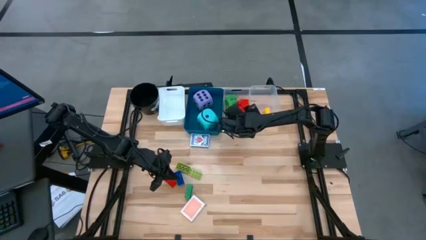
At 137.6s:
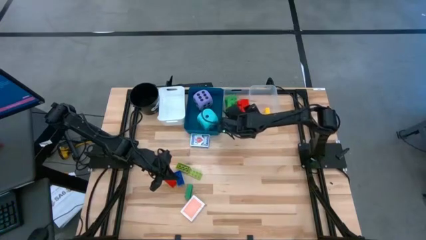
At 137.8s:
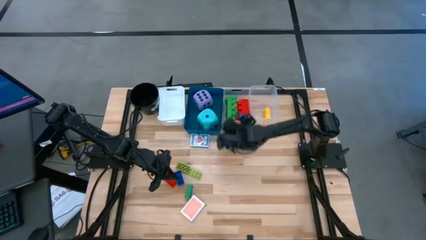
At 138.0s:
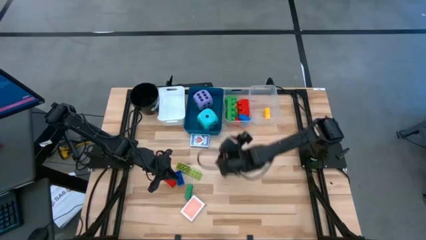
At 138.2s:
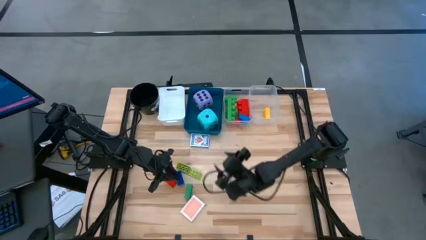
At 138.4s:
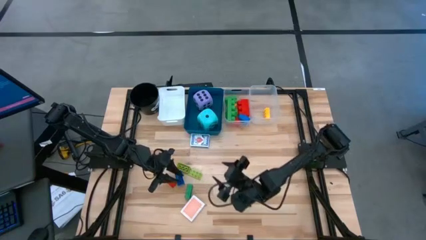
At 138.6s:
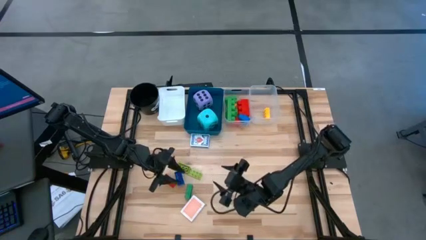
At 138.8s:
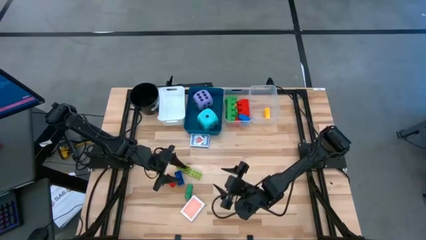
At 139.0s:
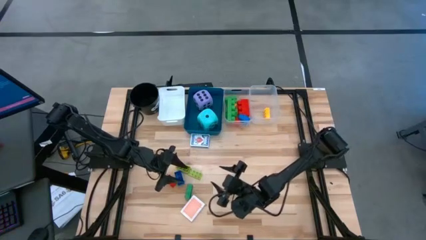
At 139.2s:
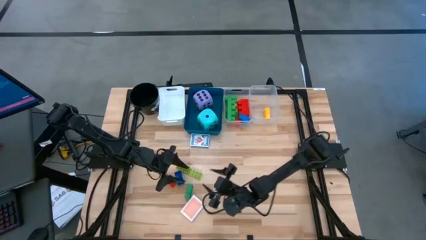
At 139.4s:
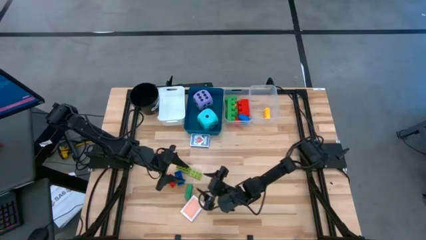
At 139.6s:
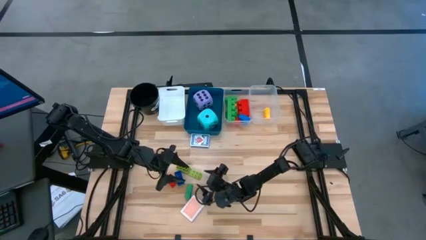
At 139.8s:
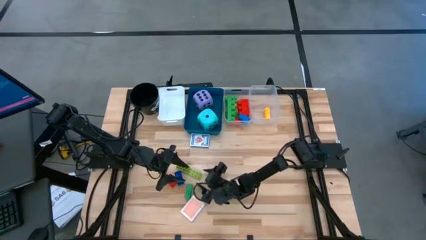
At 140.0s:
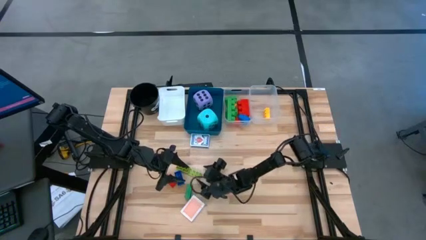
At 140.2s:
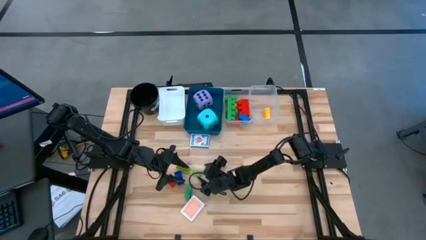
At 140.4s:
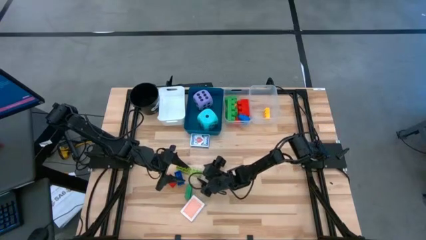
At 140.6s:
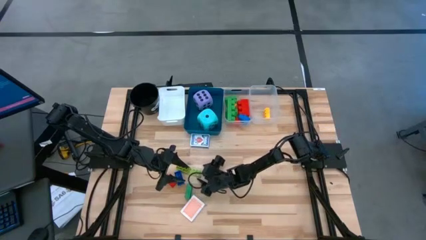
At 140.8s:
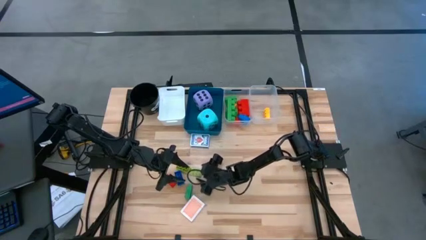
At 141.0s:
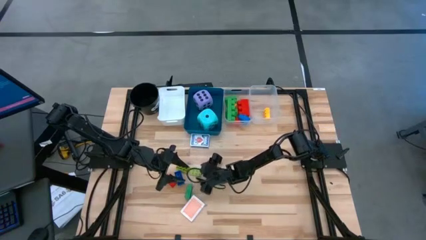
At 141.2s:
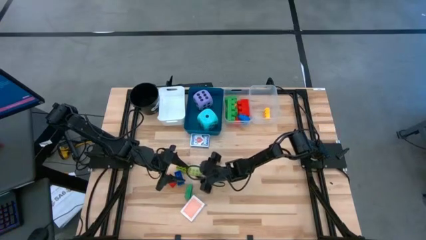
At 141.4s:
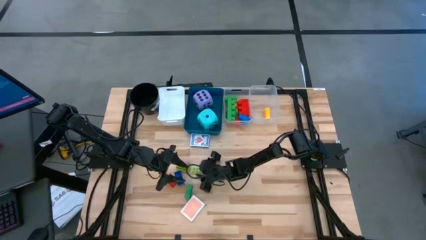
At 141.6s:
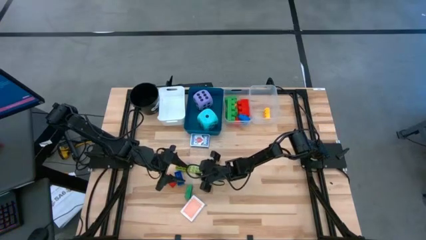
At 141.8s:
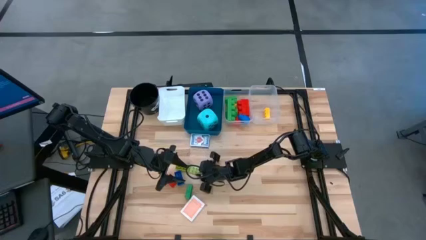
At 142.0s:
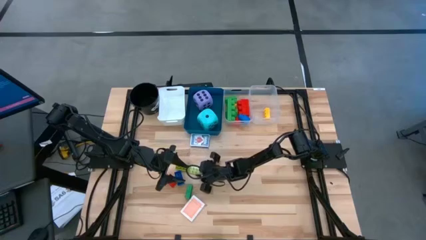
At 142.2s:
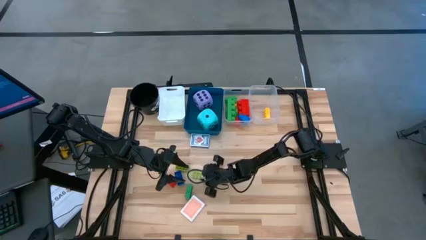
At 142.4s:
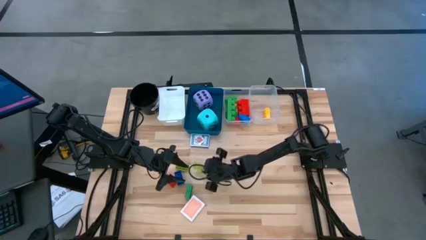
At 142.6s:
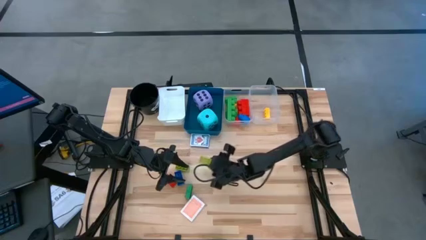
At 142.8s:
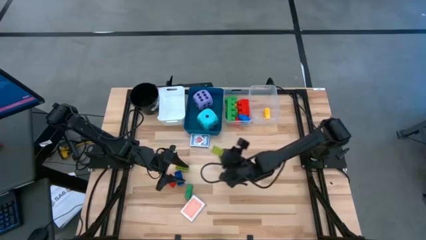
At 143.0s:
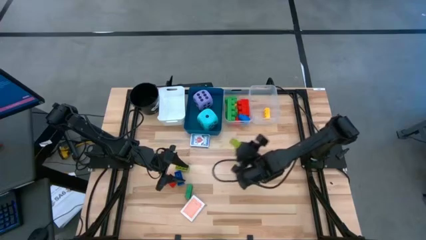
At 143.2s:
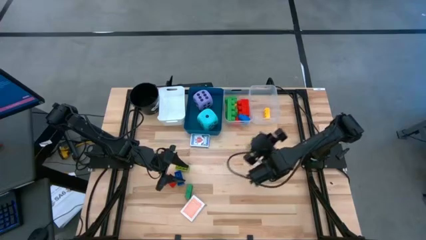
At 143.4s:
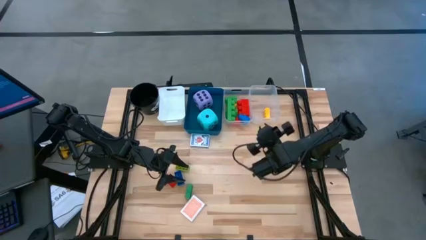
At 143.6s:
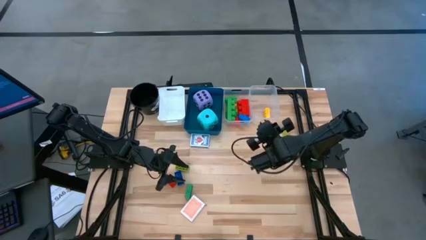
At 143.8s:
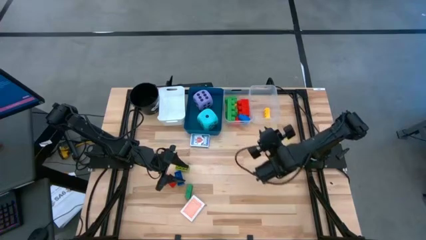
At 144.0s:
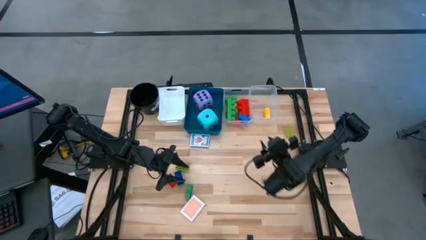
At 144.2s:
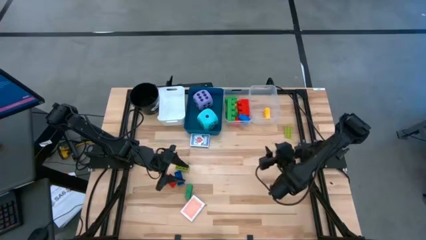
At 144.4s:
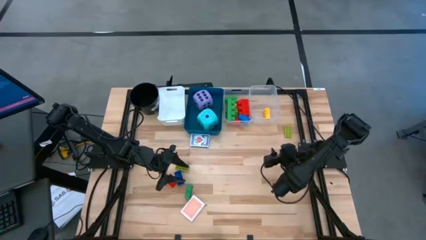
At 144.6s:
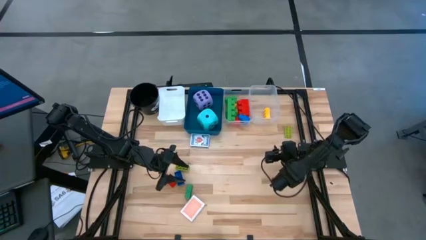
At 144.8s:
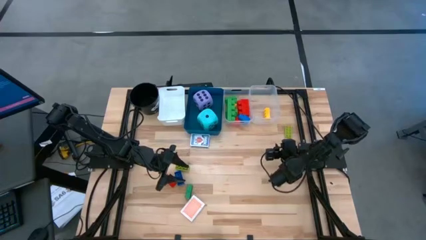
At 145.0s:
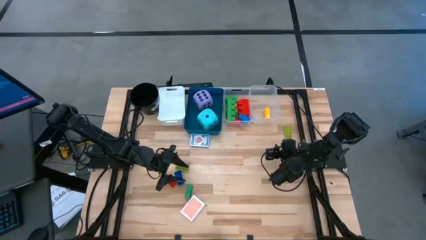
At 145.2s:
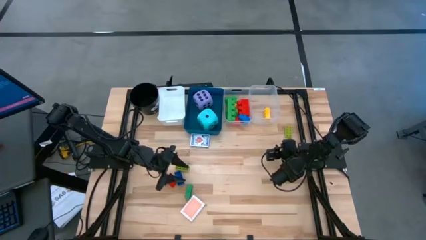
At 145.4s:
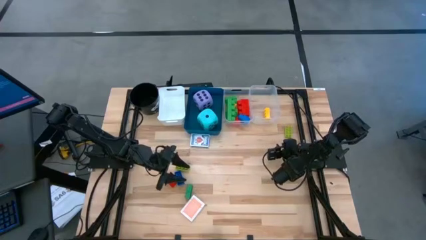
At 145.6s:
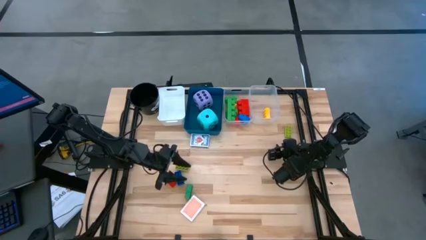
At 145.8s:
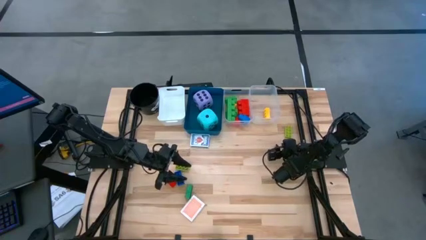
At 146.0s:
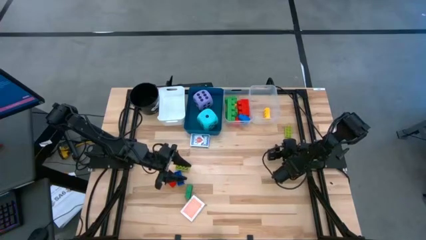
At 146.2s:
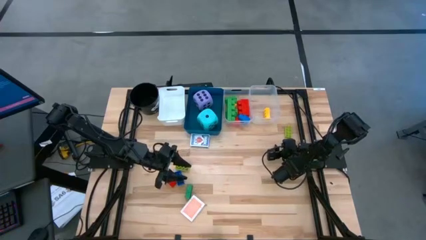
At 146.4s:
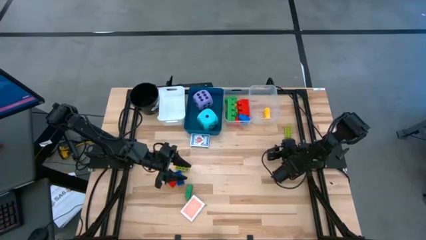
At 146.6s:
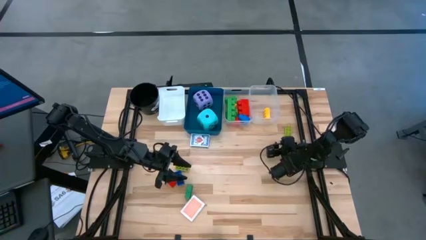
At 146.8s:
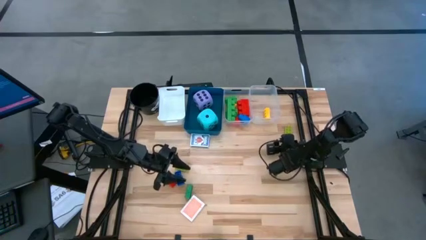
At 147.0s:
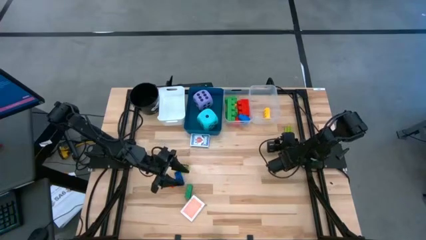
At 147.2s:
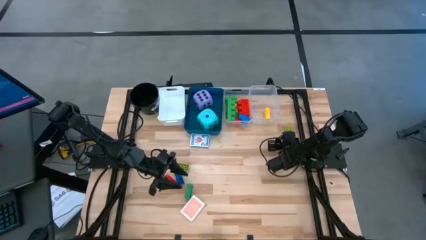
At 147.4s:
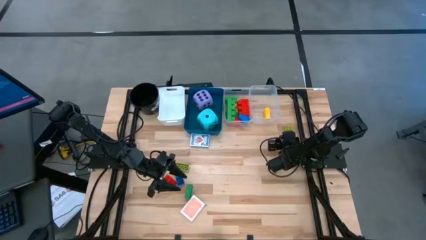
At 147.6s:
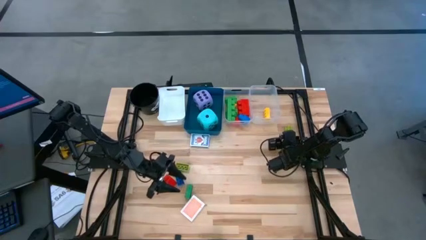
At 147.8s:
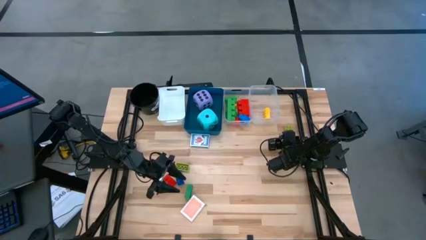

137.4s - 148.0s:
Task: Pick & Place Toys
Put the light green 8 stud game piece into the right transparent bin

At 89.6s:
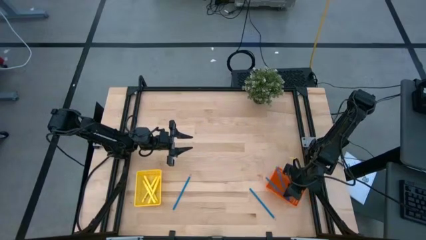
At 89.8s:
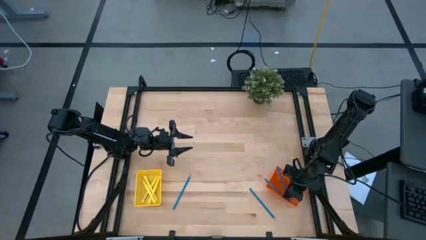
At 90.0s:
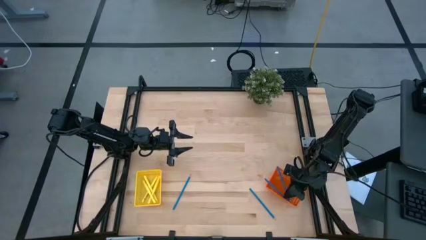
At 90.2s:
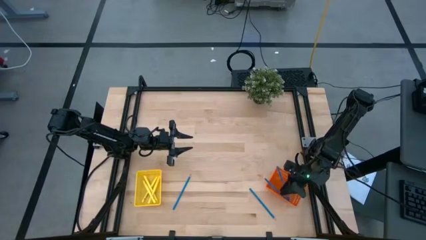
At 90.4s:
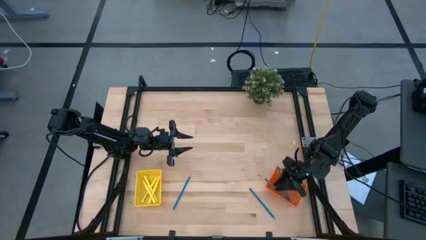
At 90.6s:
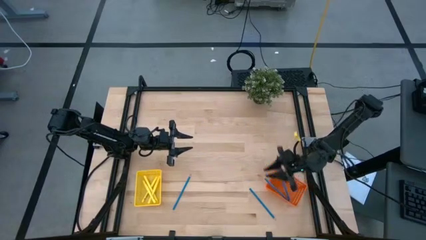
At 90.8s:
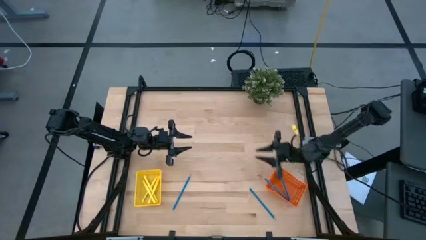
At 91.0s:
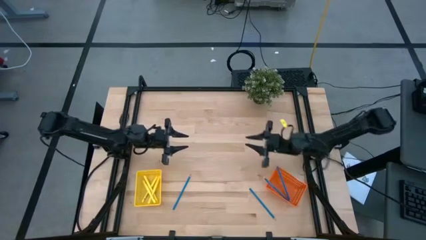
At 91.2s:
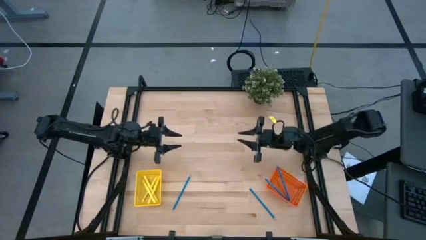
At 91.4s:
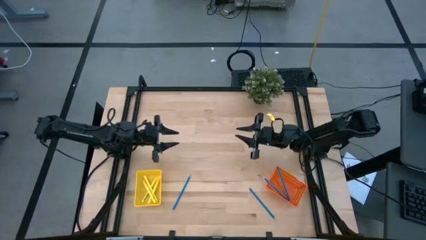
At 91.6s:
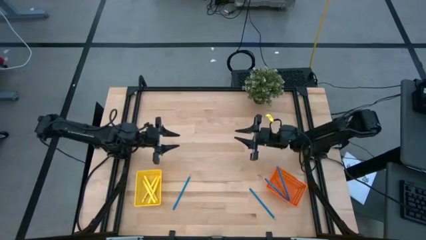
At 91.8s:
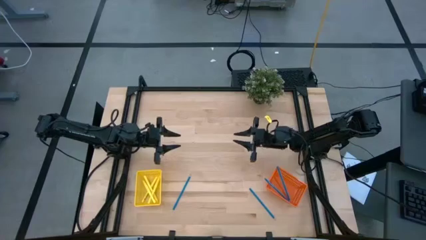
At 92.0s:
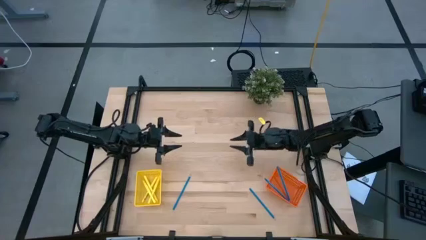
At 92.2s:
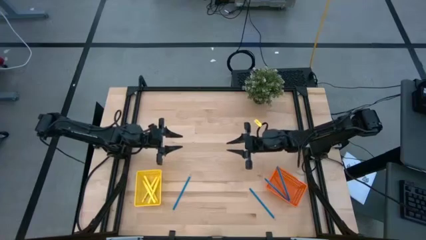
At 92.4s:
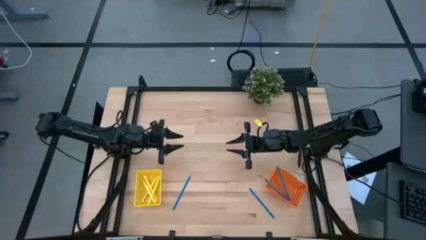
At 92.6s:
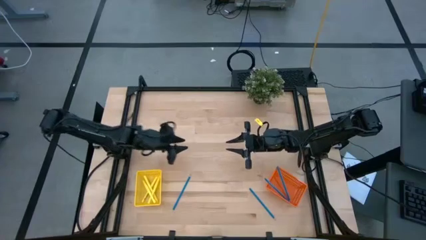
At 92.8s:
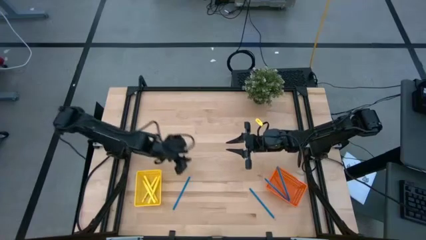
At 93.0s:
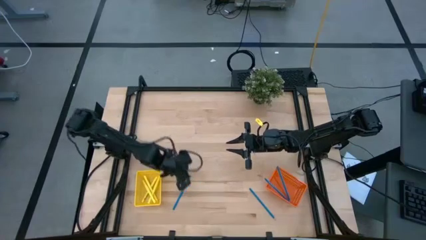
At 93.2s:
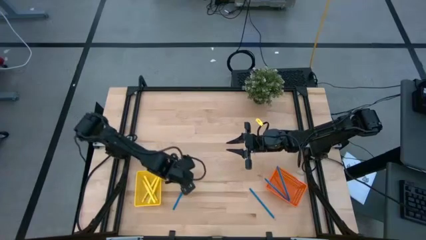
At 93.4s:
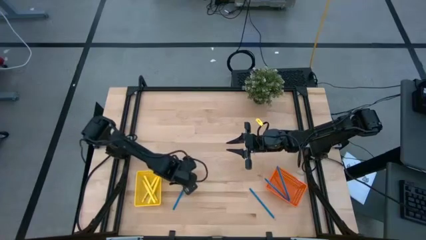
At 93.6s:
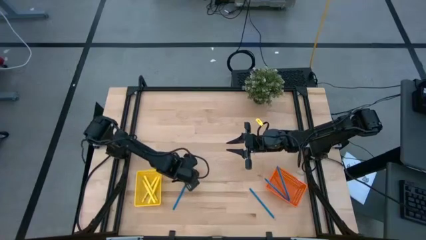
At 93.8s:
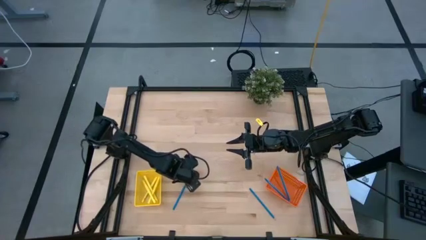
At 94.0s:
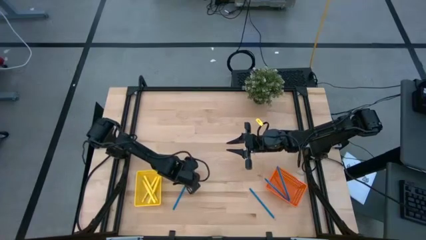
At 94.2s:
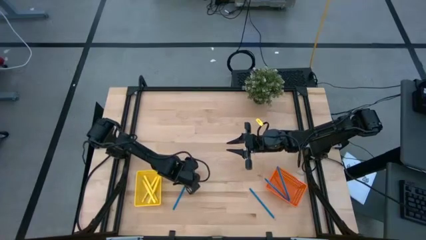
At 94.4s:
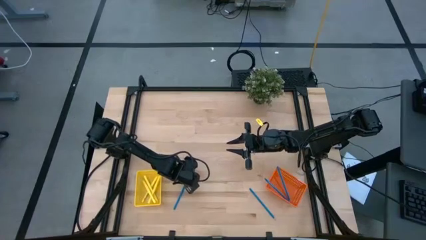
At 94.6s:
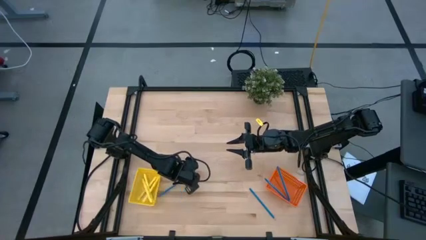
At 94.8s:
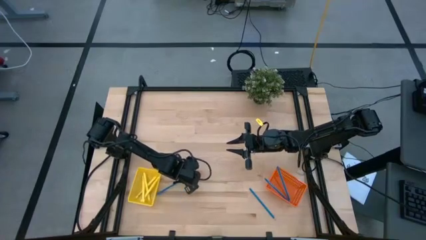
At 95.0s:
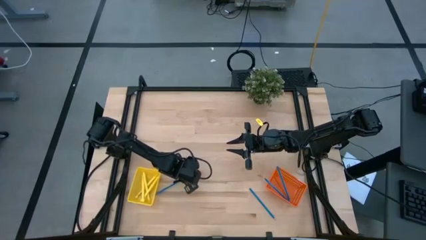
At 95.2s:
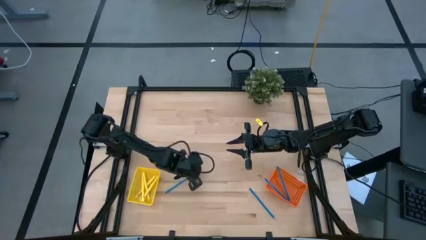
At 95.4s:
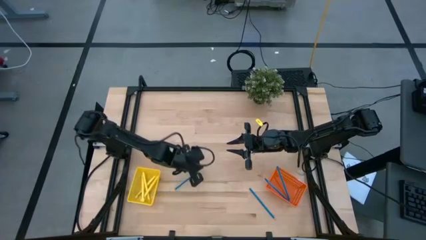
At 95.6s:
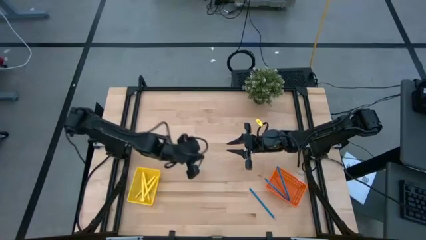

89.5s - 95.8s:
Task: Sort pens & pencils
Put the left blue pencil into the orange bin
